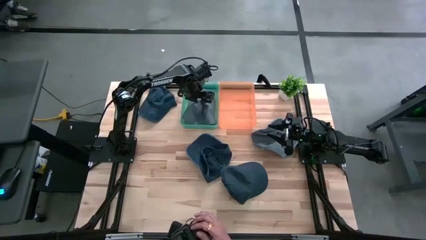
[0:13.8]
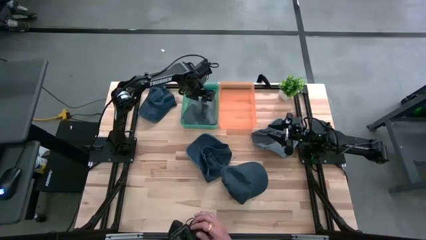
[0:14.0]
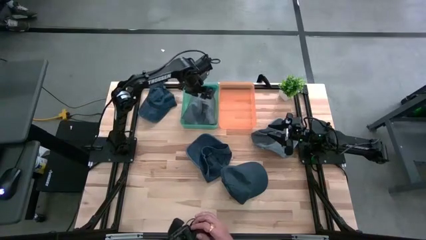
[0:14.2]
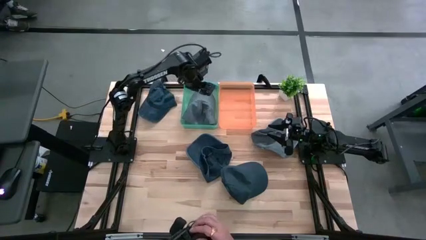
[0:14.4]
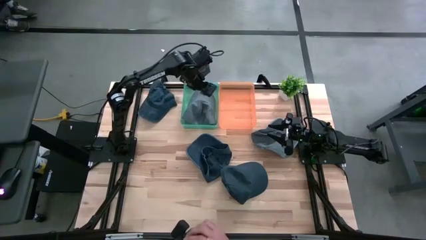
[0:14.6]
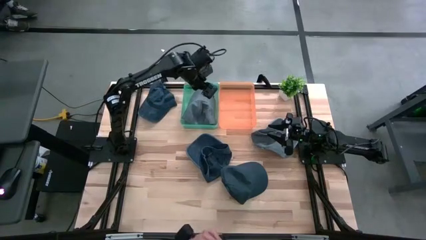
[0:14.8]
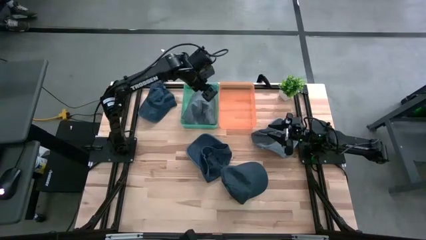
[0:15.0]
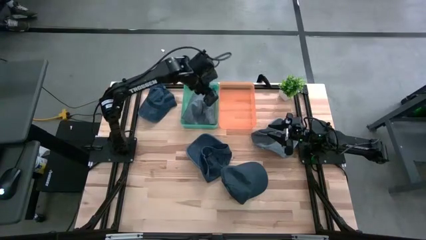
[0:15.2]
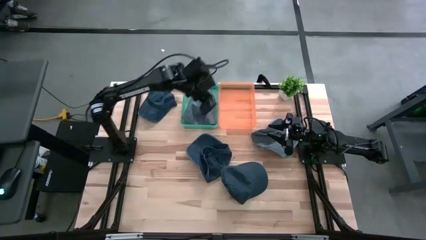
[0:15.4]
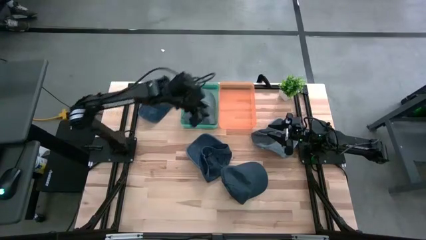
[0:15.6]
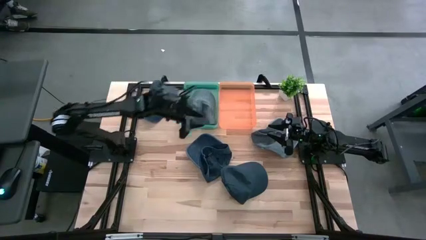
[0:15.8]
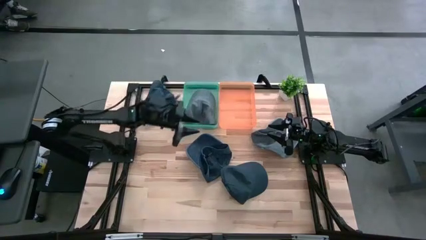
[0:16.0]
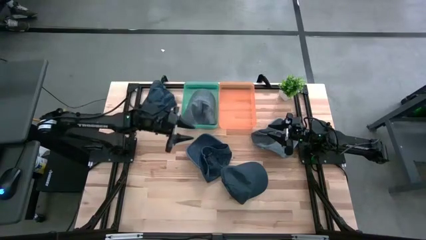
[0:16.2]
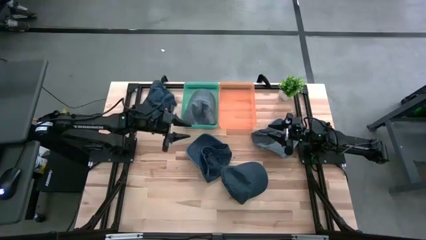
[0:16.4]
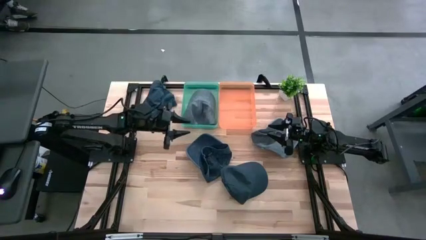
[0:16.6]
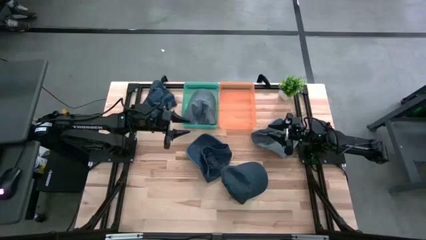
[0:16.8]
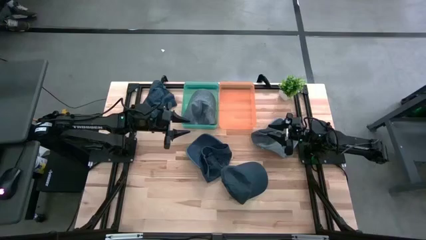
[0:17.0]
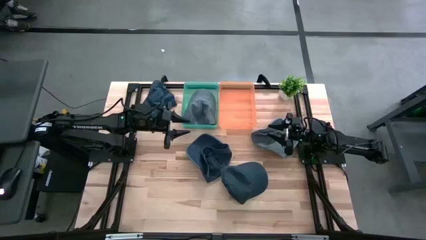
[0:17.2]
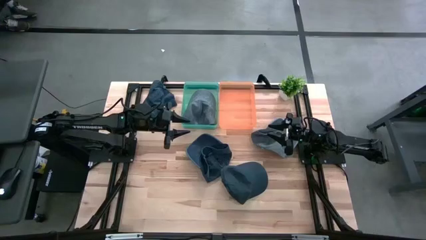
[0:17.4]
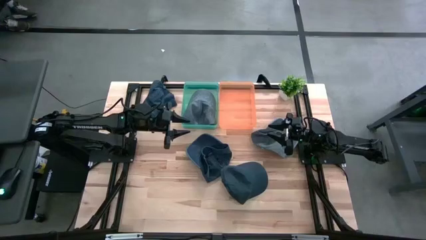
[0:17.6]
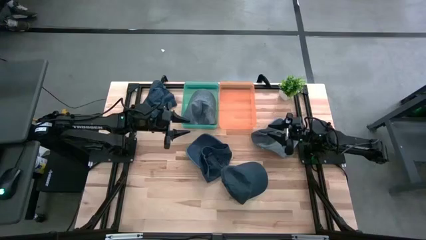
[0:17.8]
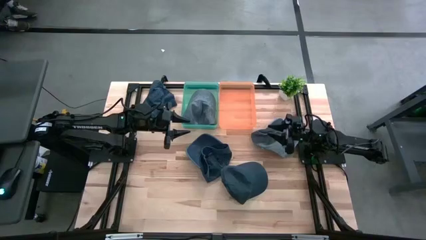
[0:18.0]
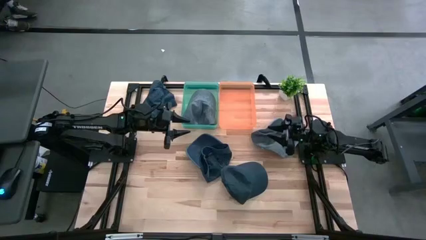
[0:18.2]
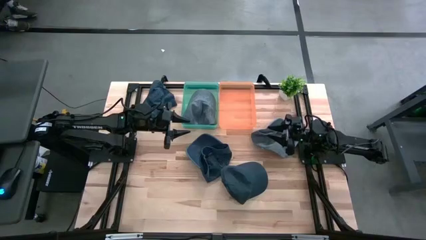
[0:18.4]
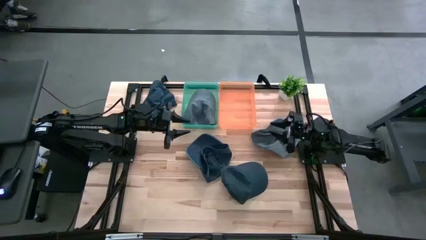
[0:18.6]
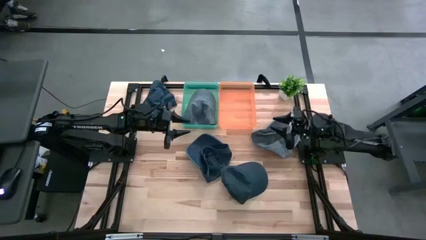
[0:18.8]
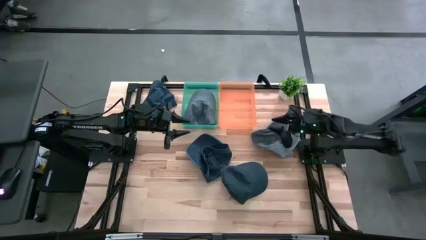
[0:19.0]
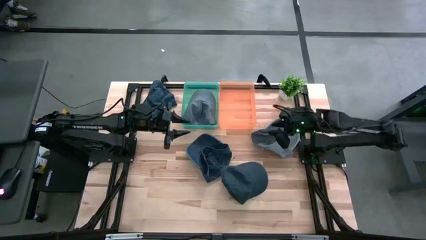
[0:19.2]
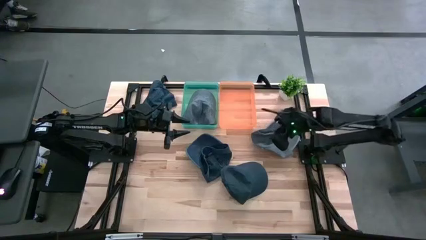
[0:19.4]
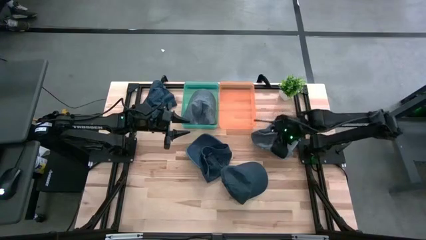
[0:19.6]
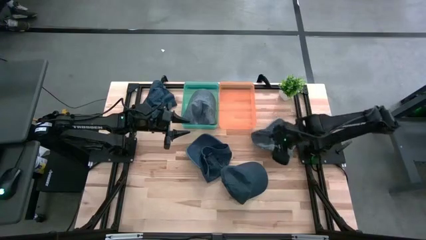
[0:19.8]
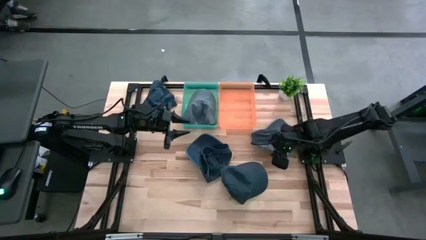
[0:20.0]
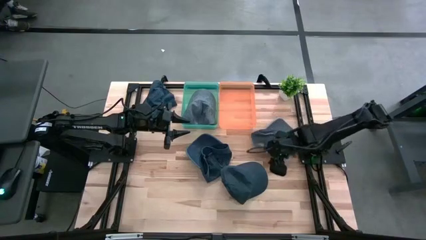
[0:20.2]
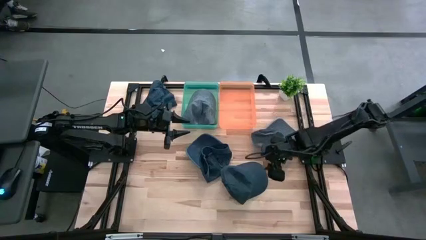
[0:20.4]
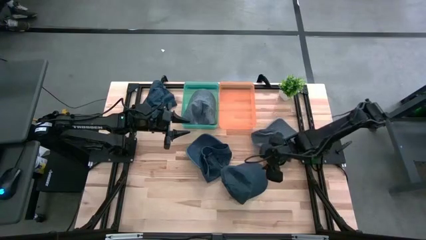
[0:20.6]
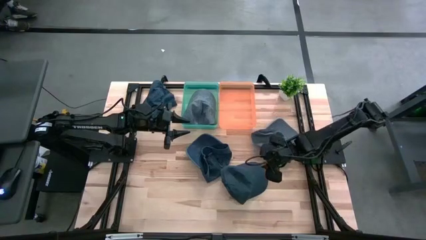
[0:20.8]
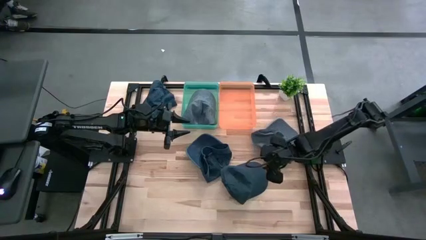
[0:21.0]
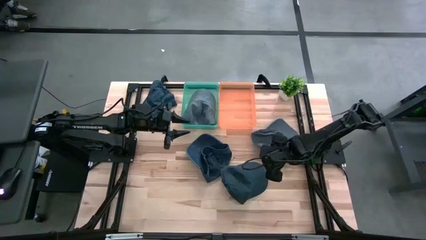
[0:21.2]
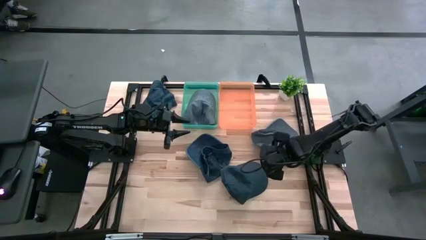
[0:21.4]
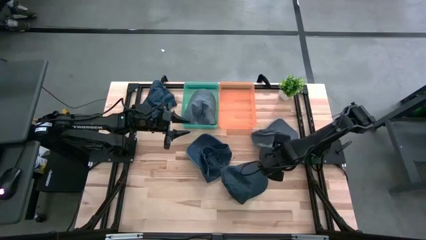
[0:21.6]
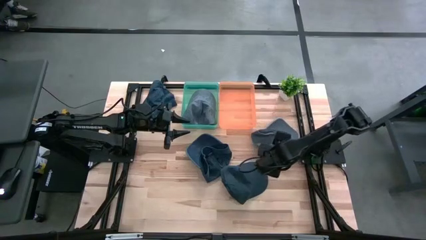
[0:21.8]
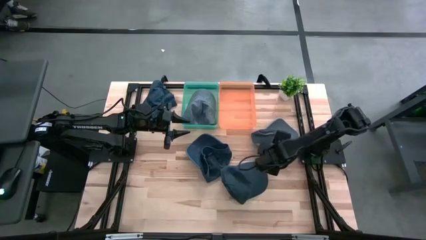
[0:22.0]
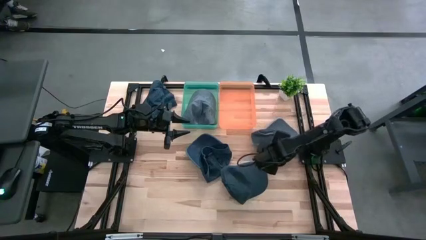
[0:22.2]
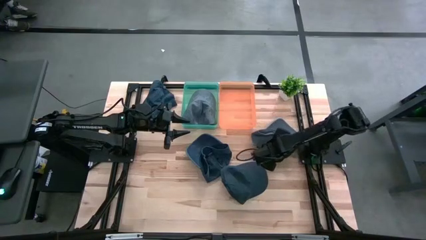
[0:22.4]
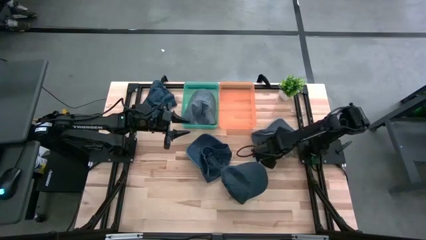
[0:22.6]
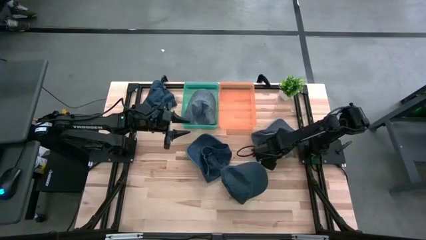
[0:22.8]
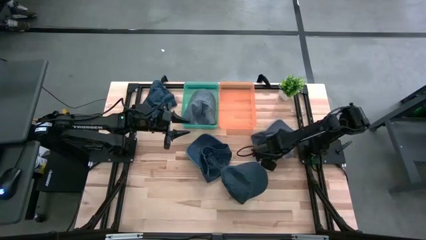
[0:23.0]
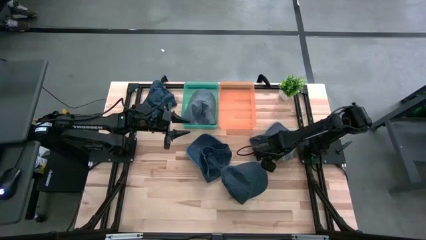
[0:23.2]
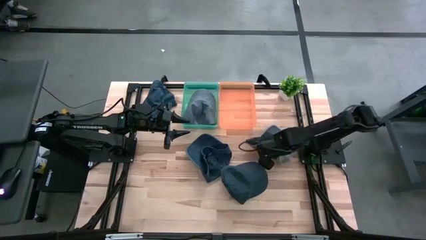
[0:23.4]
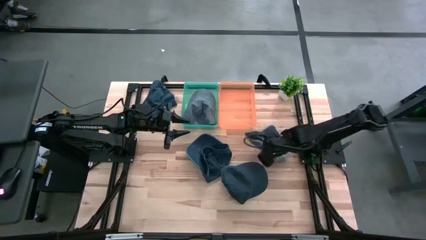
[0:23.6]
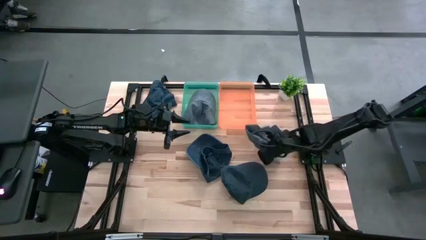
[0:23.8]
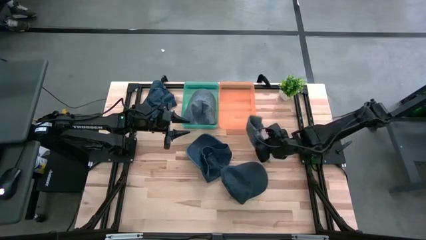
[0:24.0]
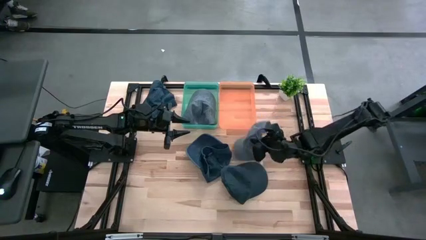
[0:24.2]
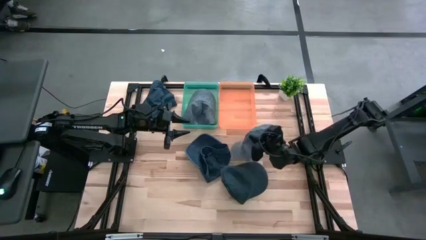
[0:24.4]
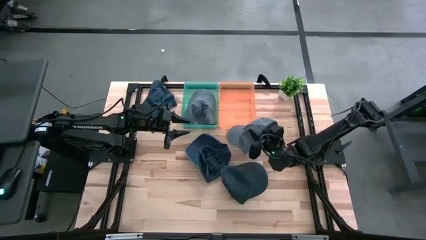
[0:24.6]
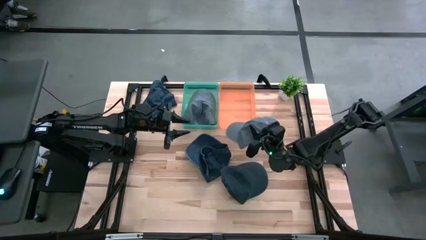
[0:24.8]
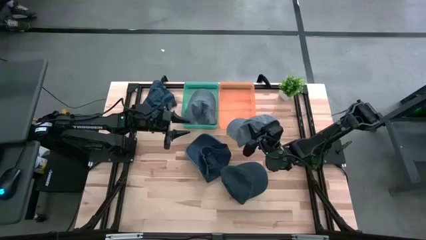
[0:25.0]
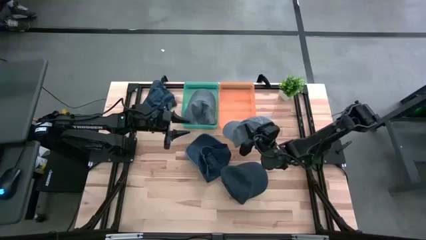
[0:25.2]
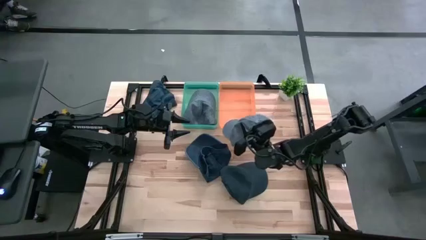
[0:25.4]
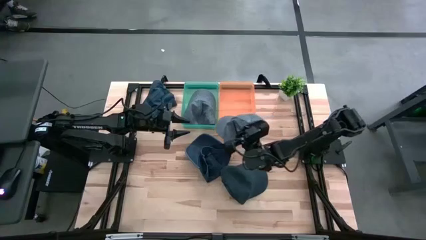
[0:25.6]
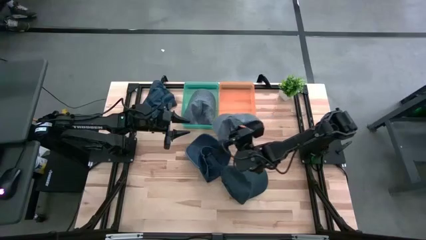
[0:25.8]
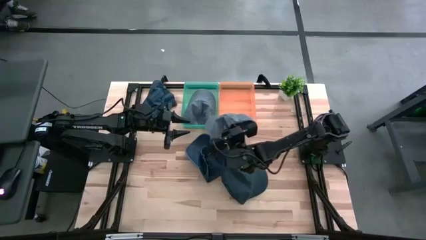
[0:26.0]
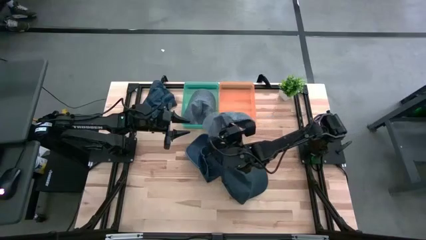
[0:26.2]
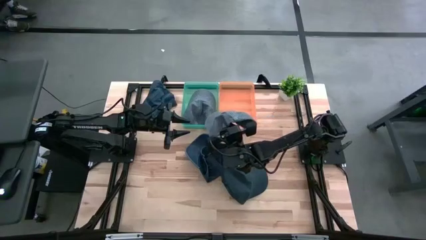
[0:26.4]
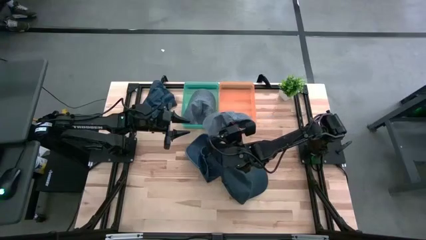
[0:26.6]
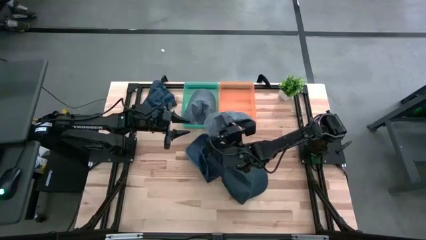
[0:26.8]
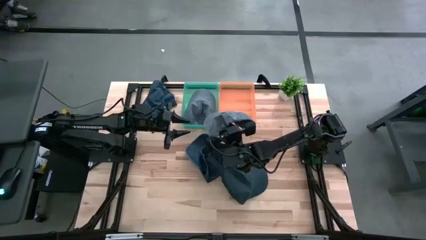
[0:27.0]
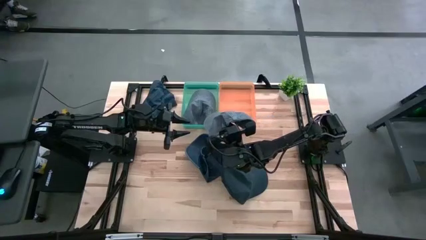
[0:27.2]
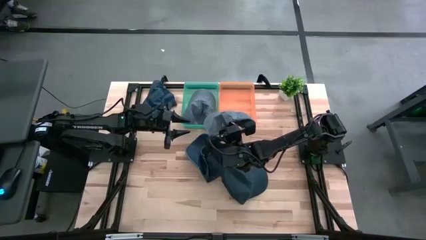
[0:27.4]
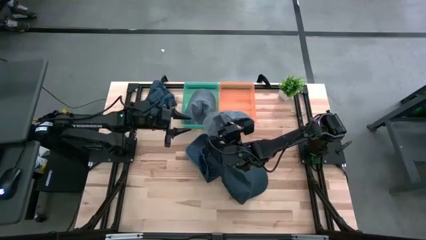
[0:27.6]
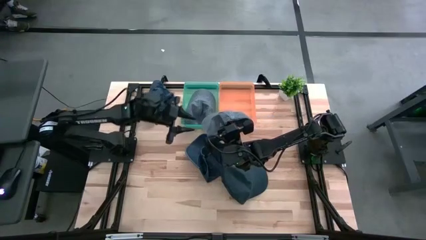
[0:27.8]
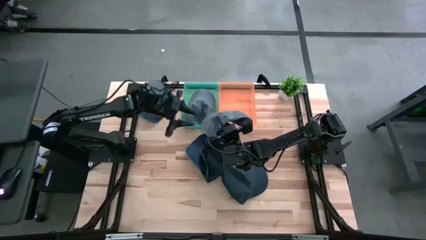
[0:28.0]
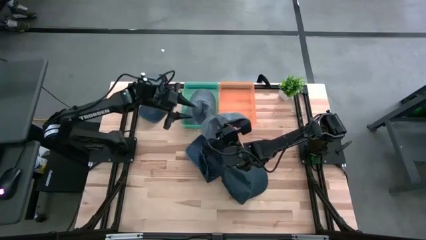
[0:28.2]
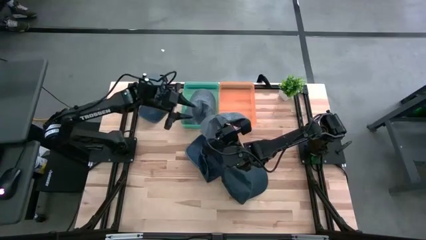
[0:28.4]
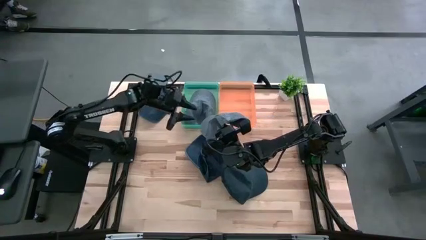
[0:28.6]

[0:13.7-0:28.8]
Task: Pick & Place hat
Put the gray cap into the blue bin
